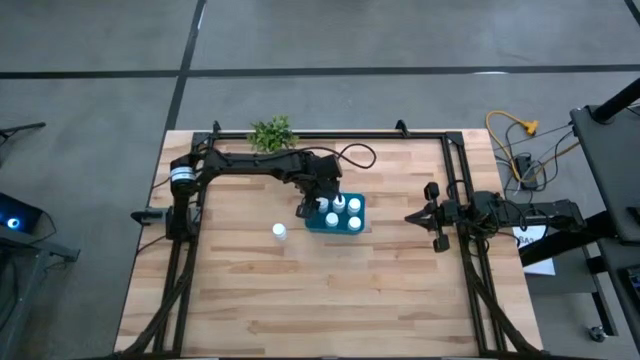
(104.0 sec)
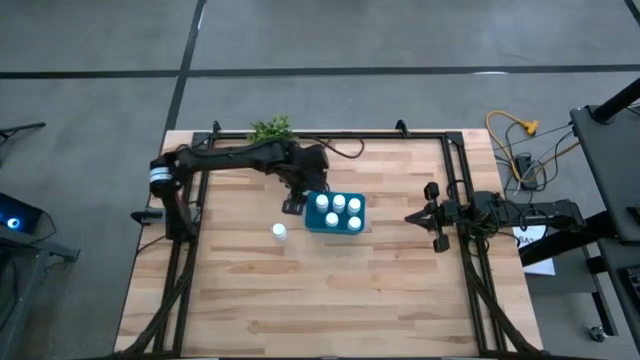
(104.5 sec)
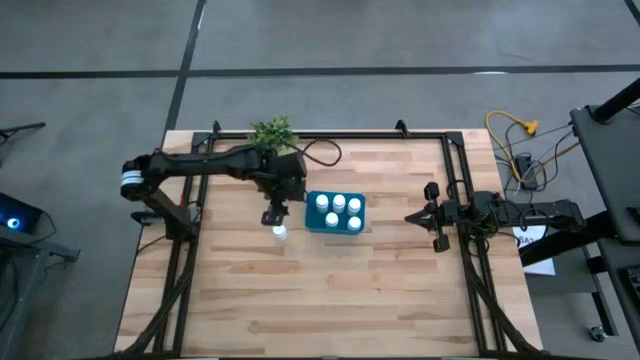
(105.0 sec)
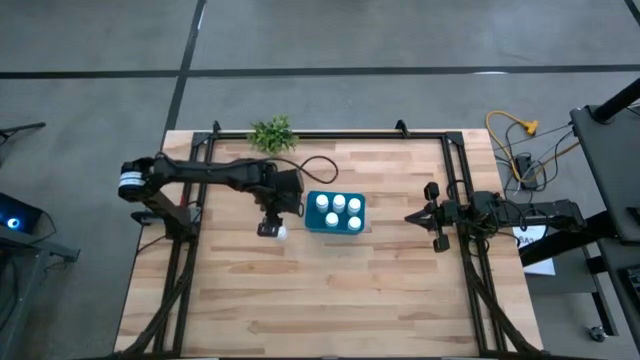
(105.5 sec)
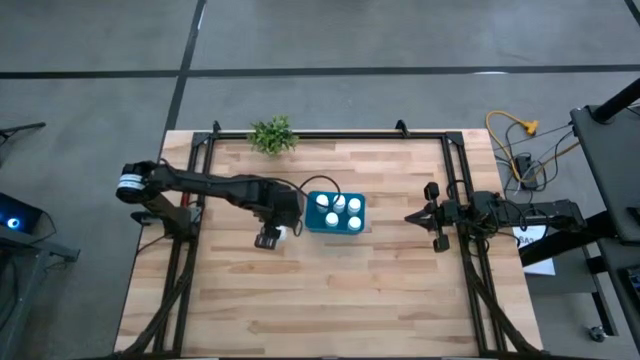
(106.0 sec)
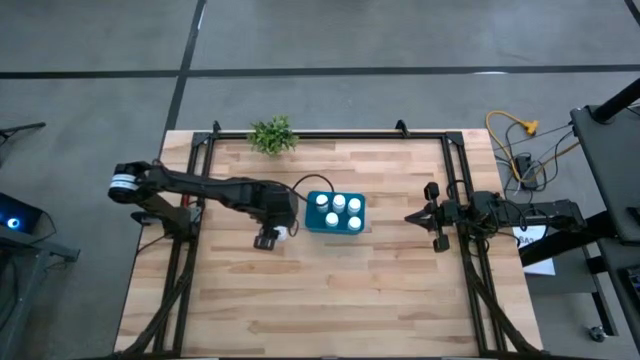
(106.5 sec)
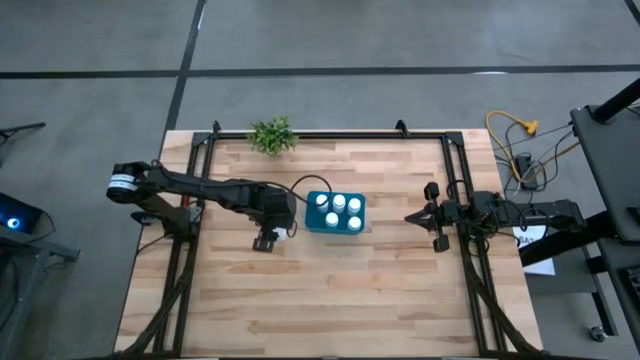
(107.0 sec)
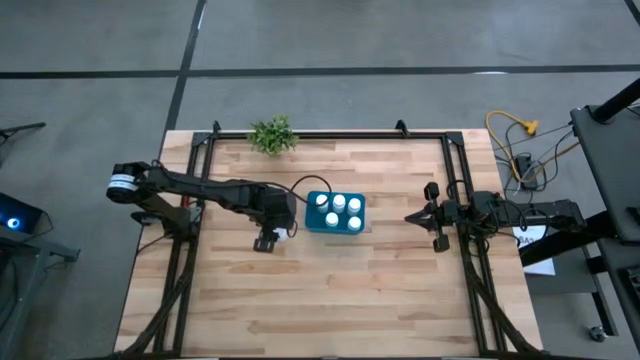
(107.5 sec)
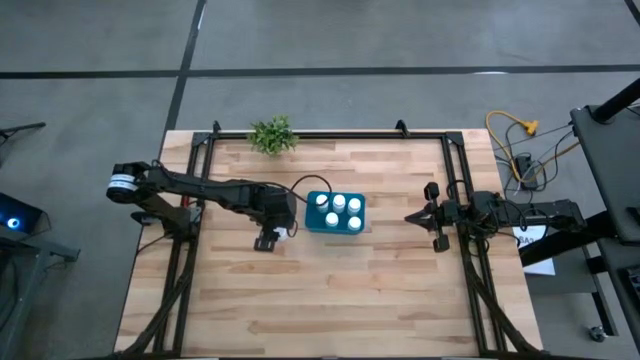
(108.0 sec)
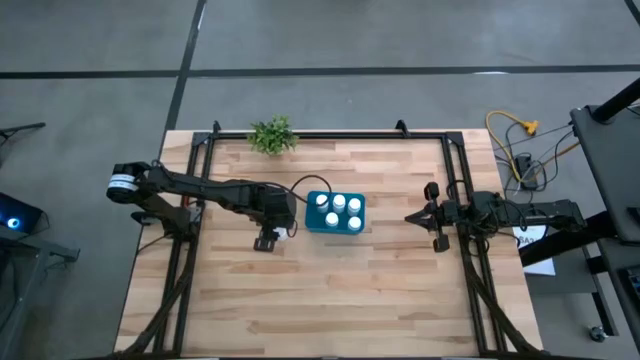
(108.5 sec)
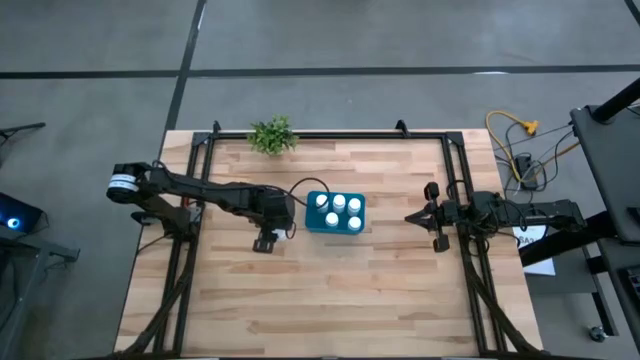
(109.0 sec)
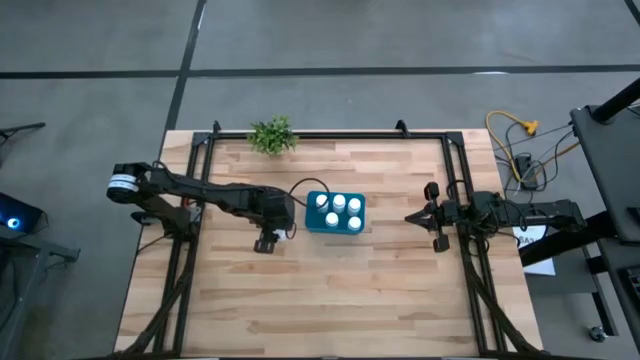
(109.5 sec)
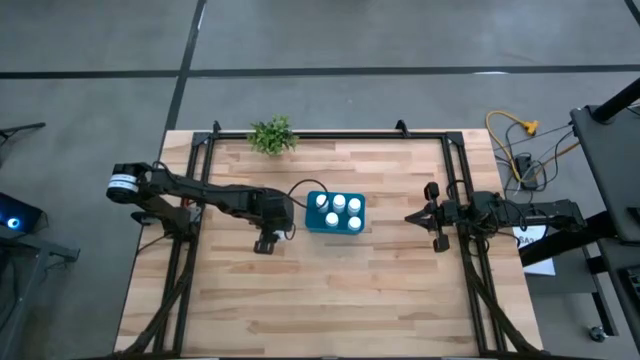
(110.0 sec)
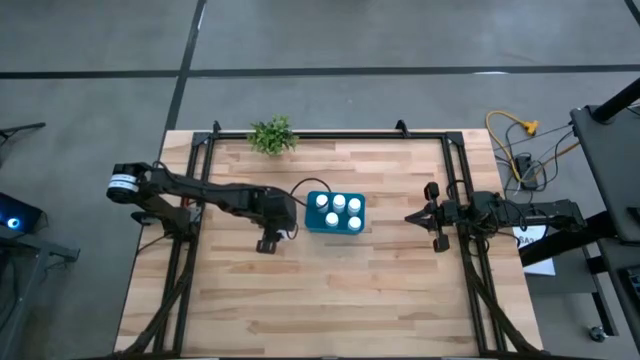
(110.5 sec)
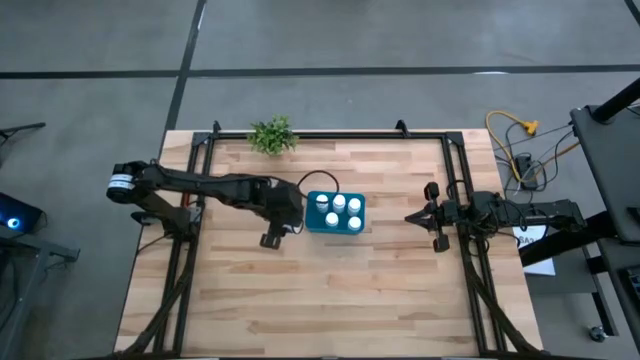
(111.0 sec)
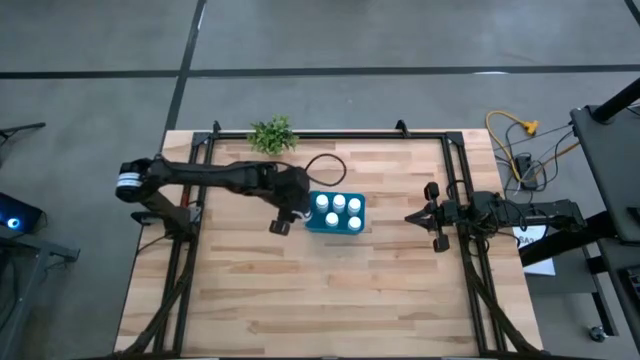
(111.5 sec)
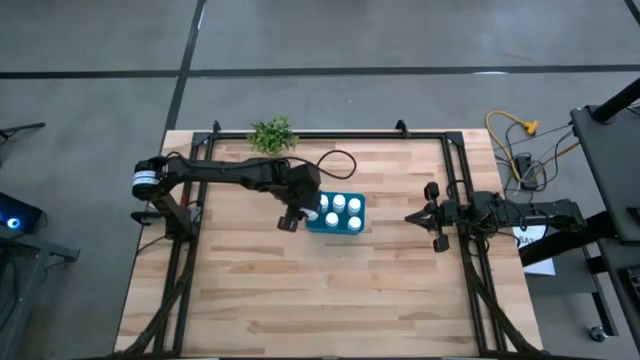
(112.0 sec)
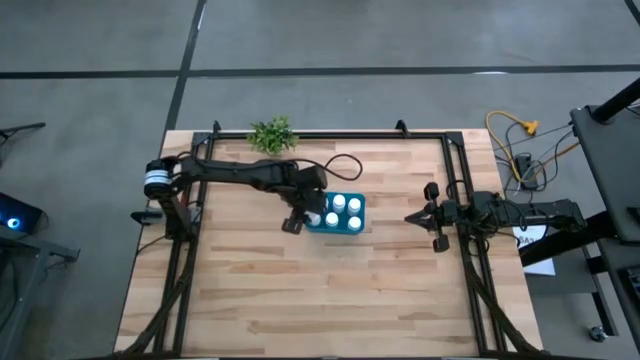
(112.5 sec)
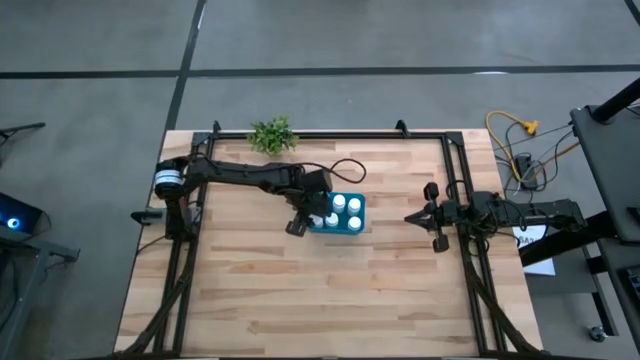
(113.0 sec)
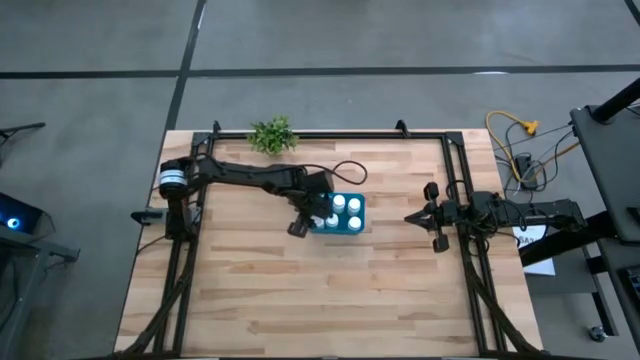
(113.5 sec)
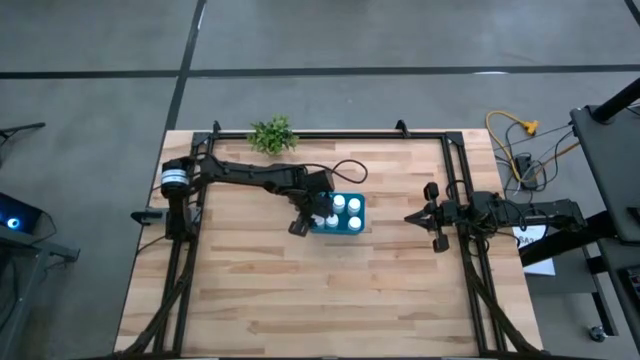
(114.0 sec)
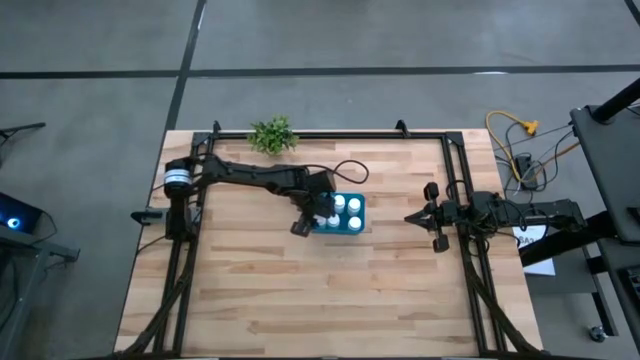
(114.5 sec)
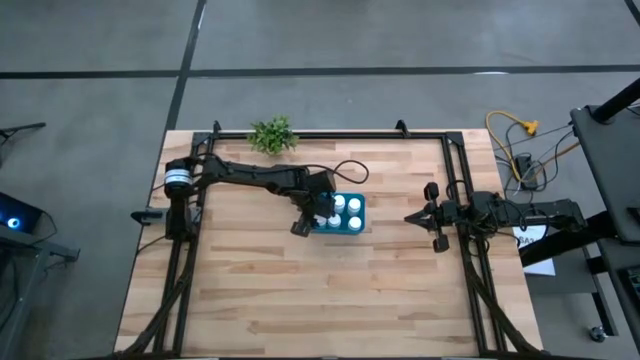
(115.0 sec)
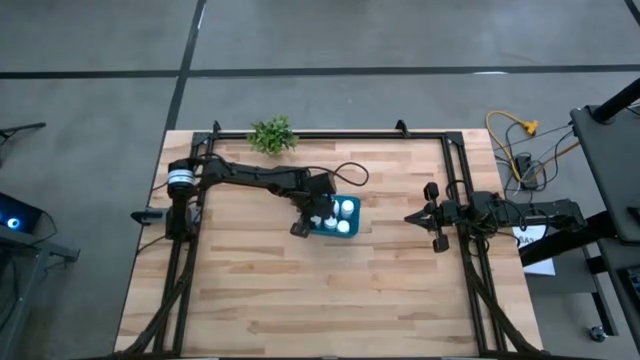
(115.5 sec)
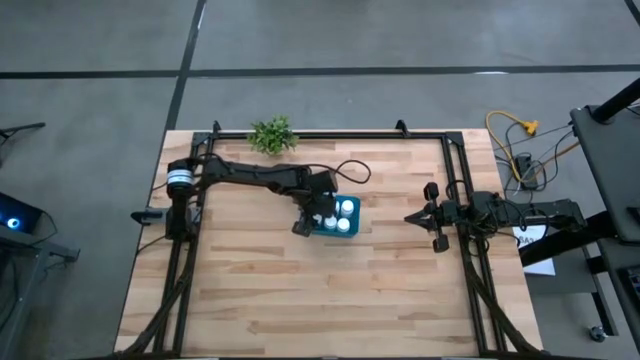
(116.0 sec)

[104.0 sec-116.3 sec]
Task: Pick and place pill bottles into a basket
Put the white medicine bottle into the blue bin

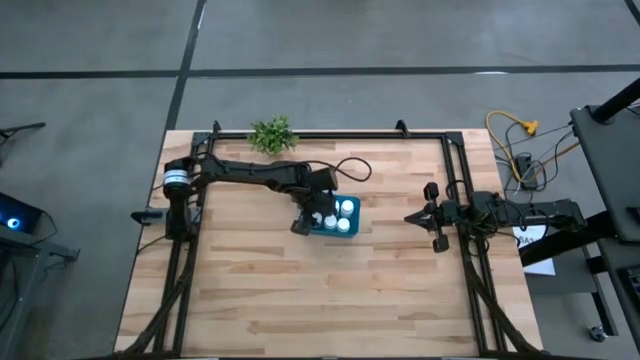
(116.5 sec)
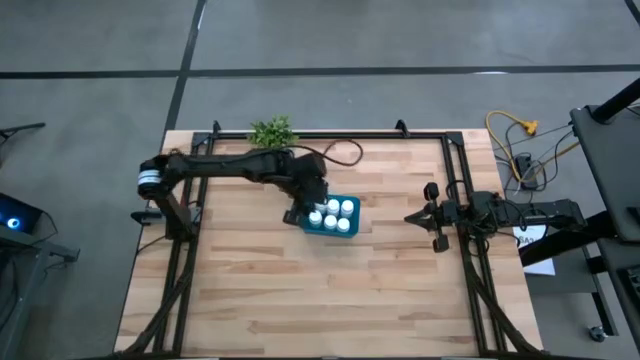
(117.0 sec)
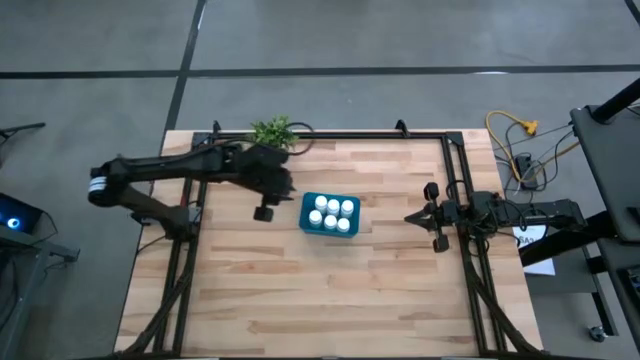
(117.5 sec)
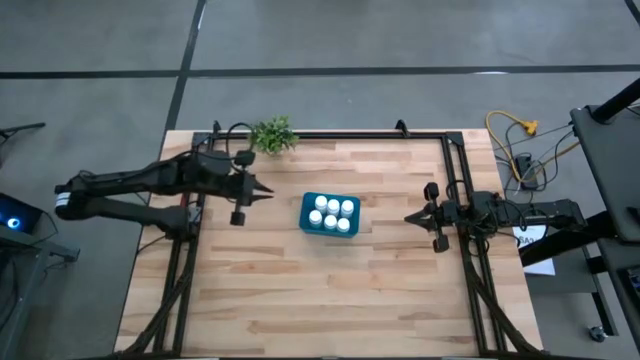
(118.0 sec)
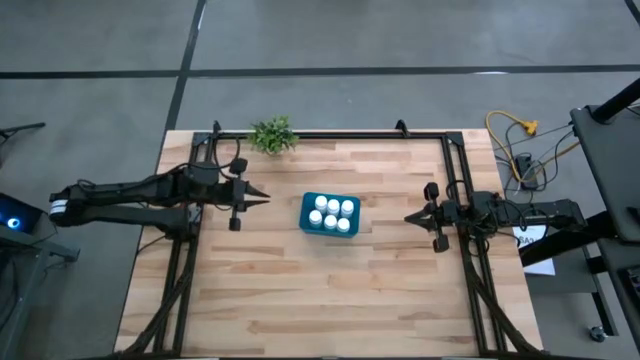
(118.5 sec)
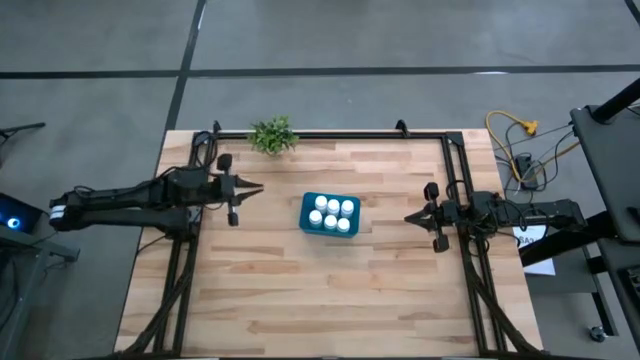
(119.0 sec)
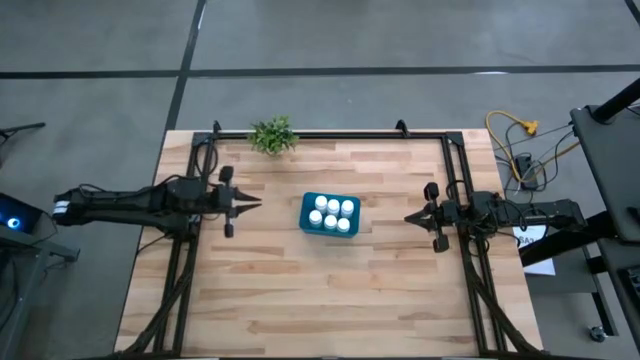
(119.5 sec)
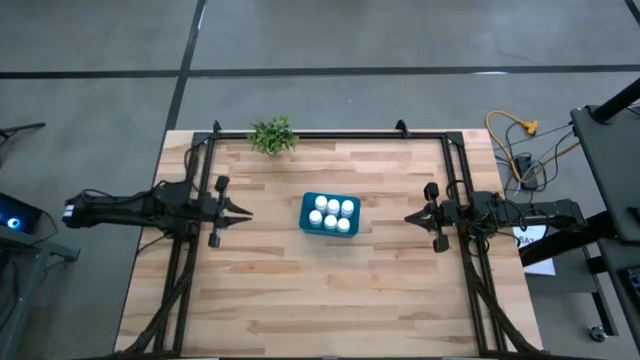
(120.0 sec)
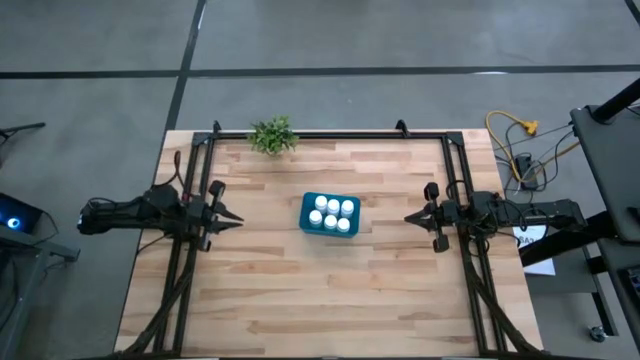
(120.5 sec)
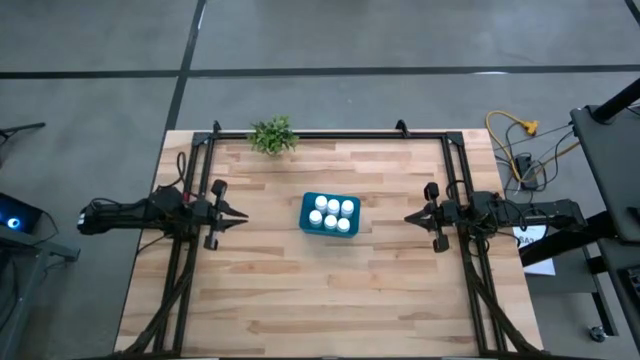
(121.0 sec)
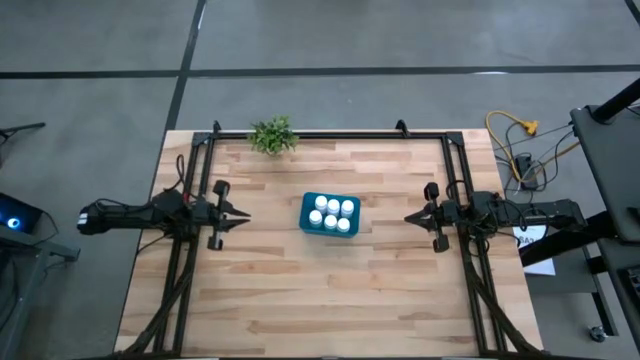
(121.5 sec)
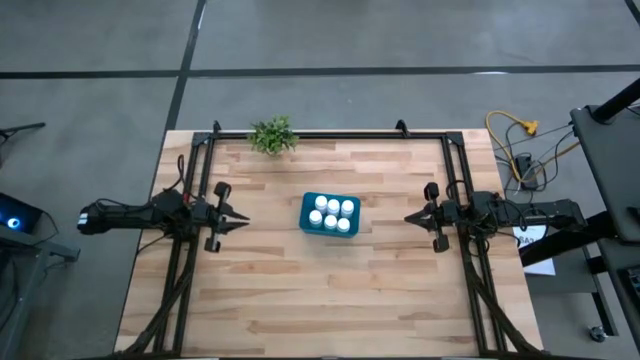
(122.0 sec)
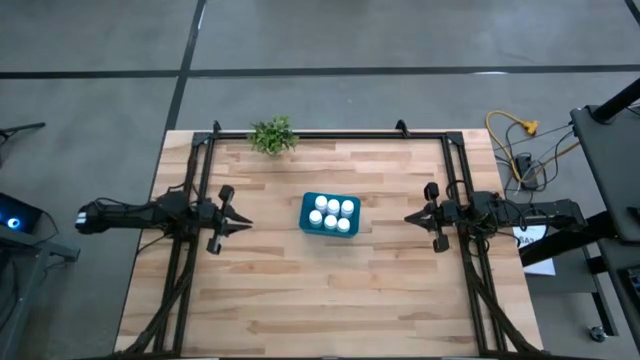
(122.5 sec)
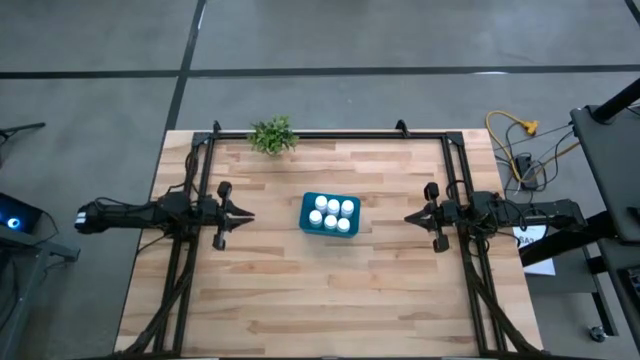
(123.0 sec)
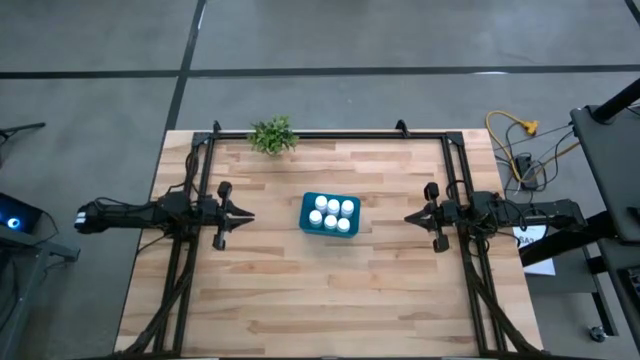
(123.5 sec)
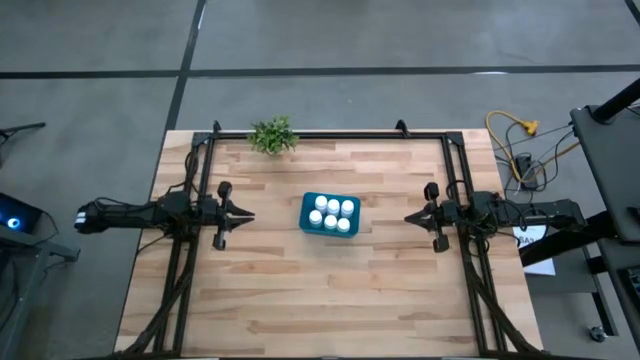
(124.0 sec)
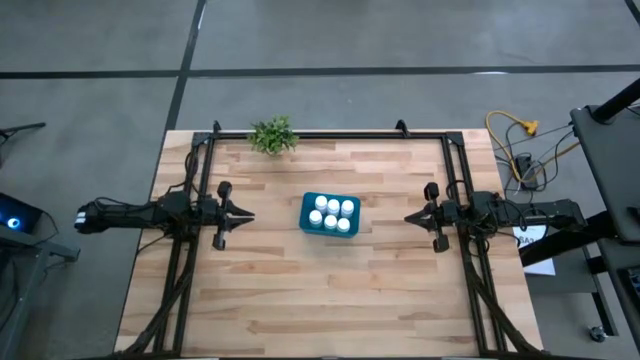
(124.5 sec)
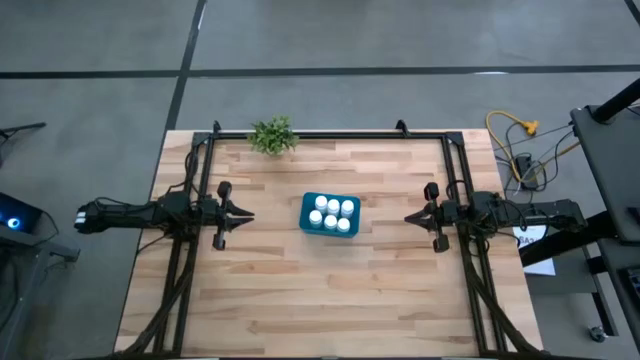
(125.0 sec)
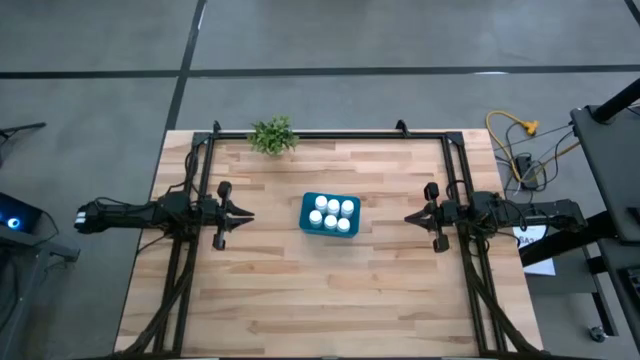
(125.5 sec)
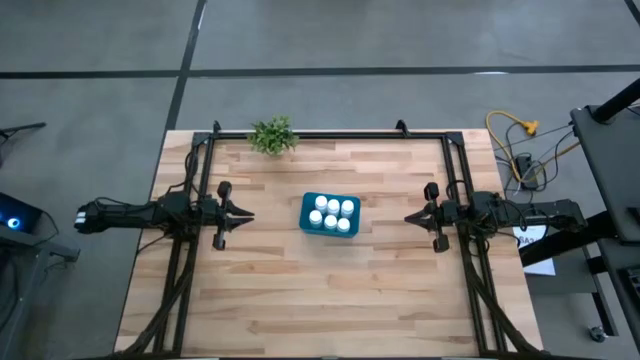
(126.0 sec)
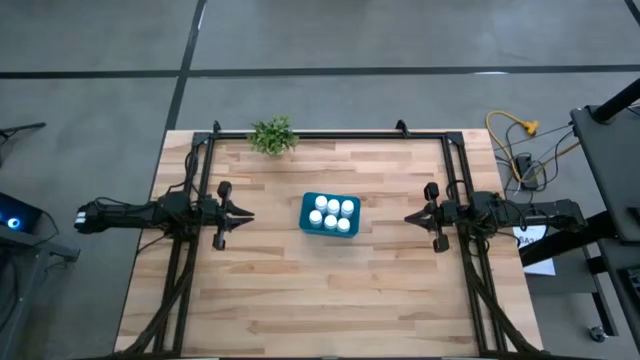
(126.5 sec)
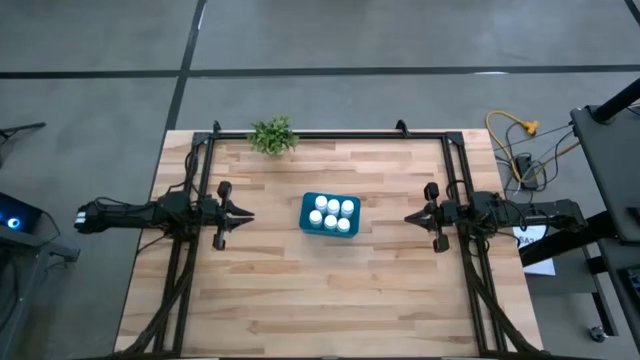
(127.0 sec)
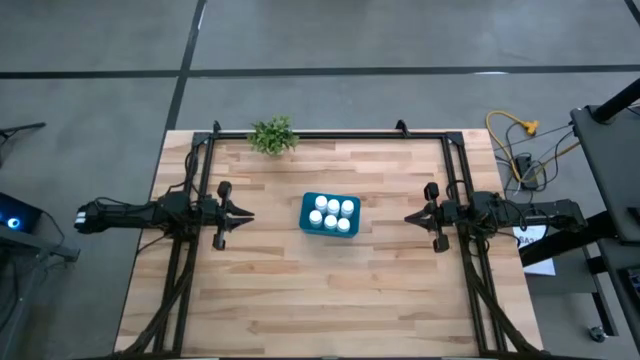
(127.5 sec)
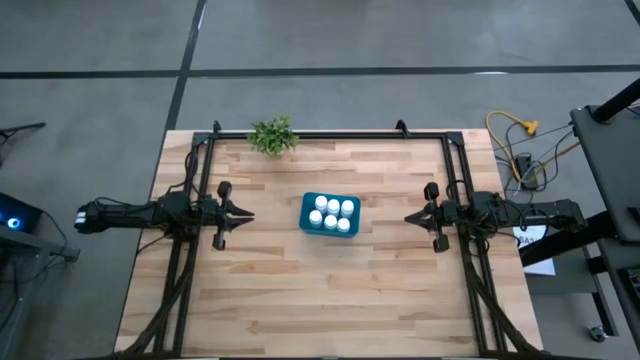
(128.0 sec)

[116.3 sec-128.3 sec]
Return to Home Position
